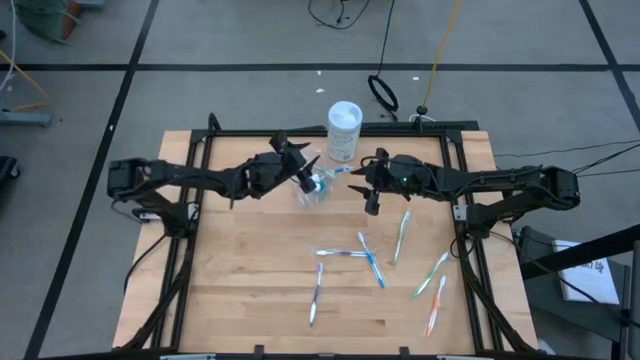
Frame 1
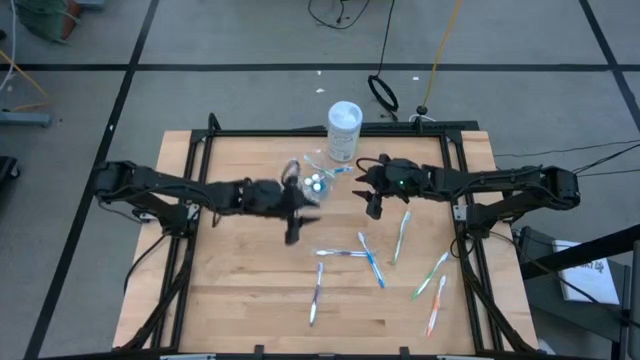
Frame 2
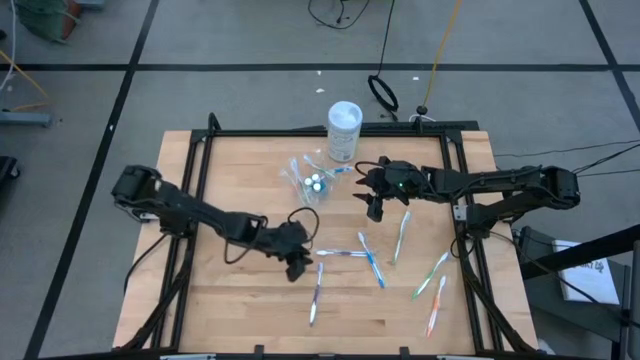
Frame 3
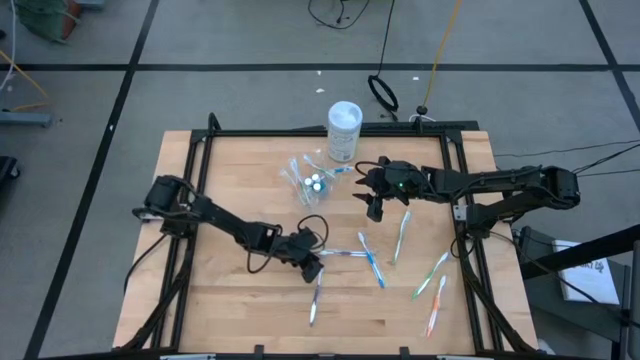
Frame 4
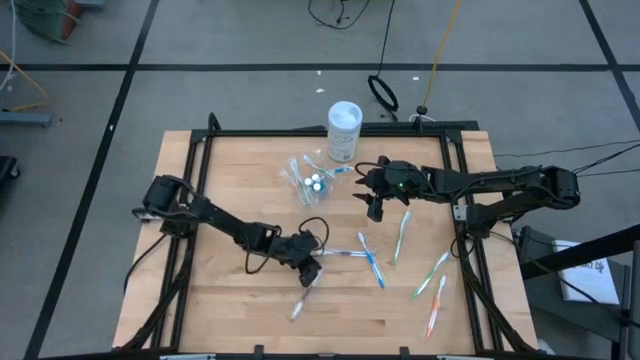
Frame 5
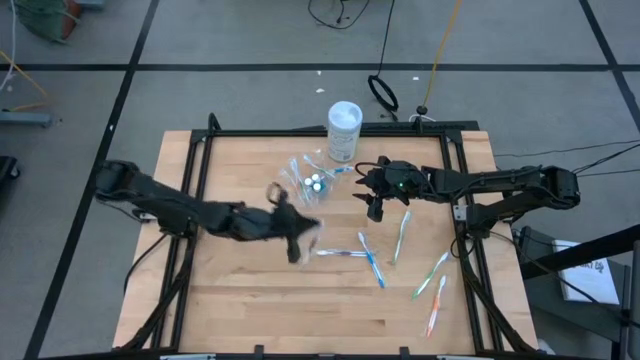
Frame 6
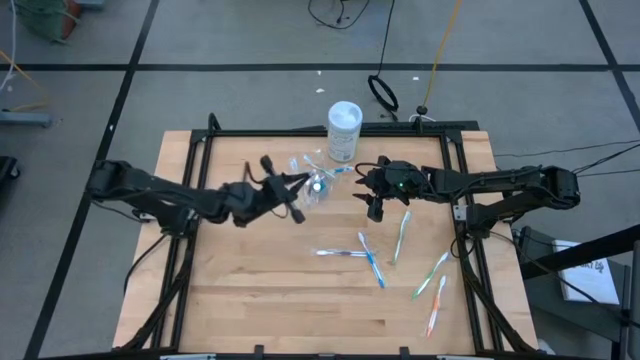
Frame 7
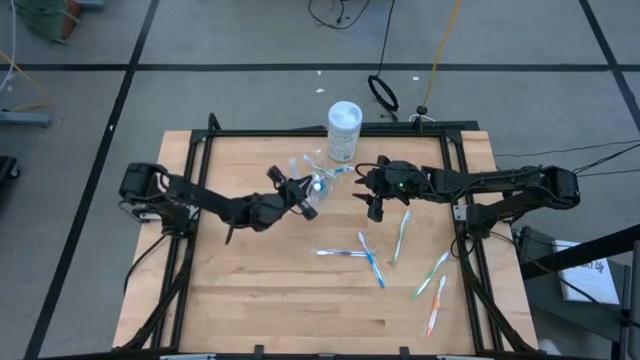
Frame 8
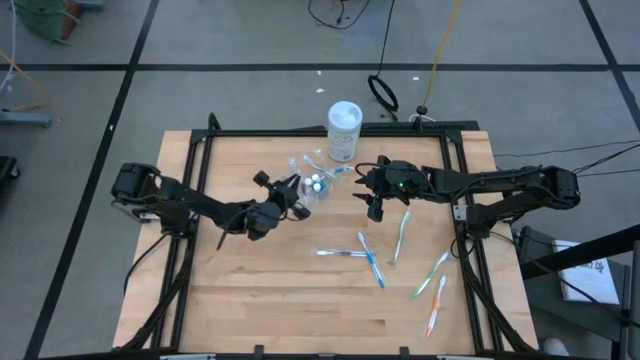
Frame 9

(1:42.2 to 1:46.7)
Task: Pick & Place toothbrushing station
Put the purple toothbrush into the transparent organizer

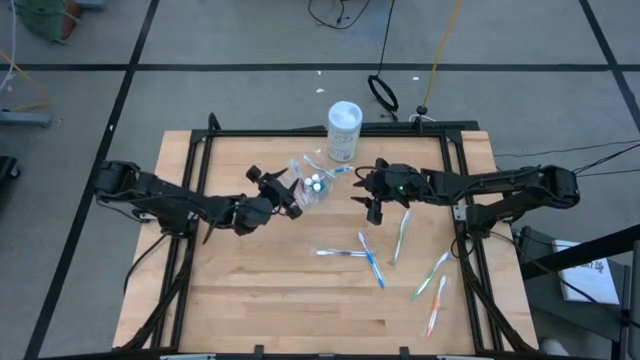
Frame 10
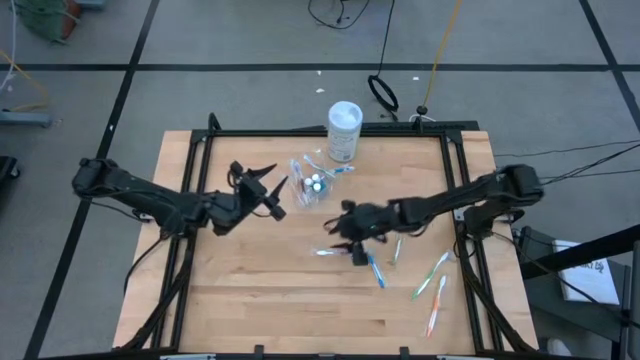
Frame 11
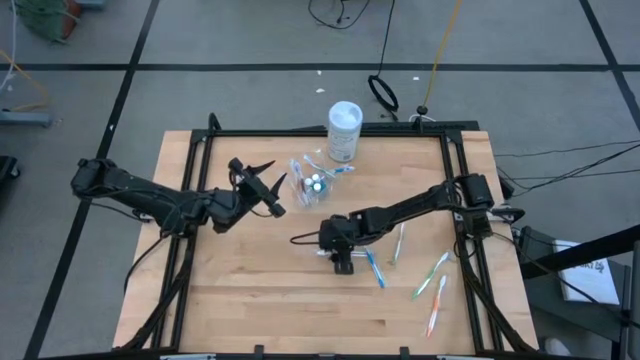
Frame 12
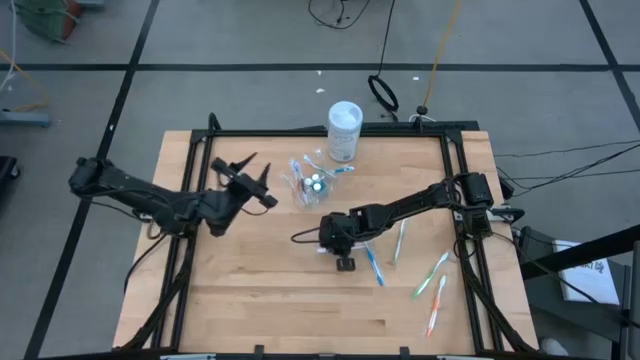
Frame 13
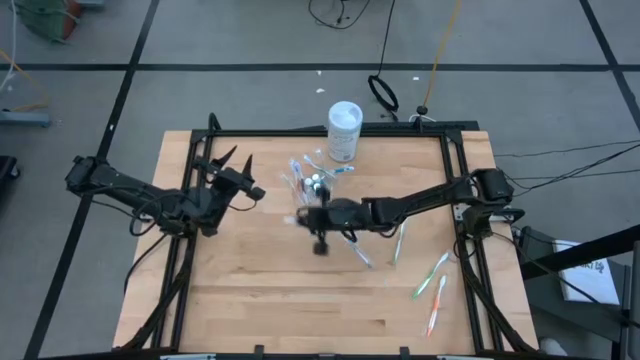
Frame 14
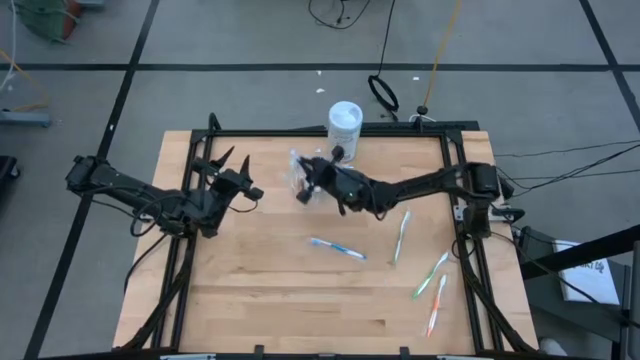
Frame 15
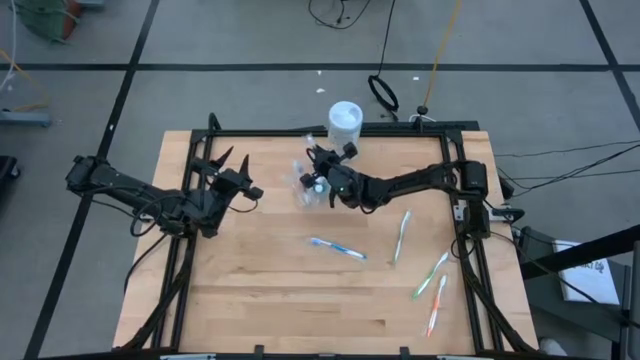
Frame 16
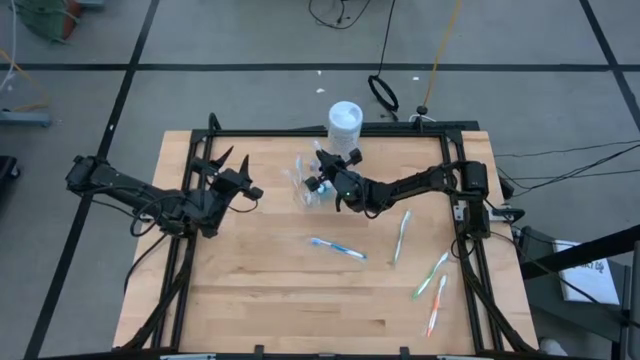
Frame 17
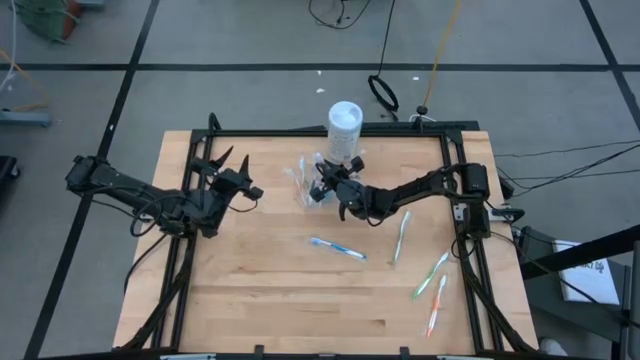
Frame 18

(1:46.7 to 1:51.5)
Put the purple toothbrush into the transparent organizer

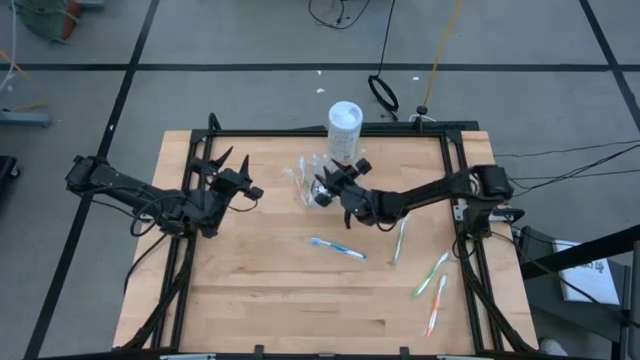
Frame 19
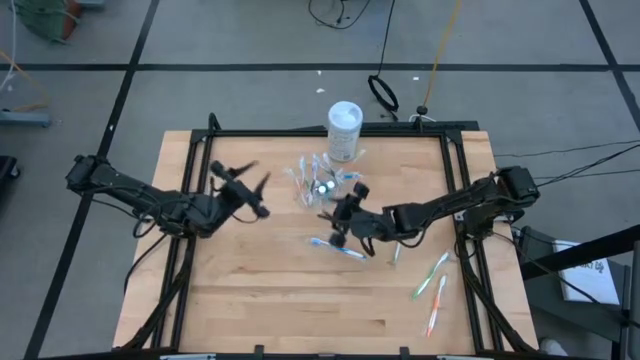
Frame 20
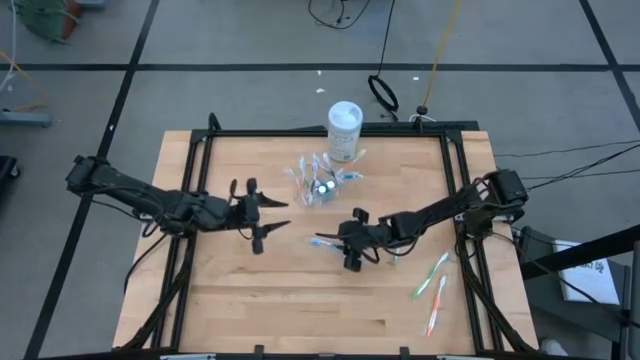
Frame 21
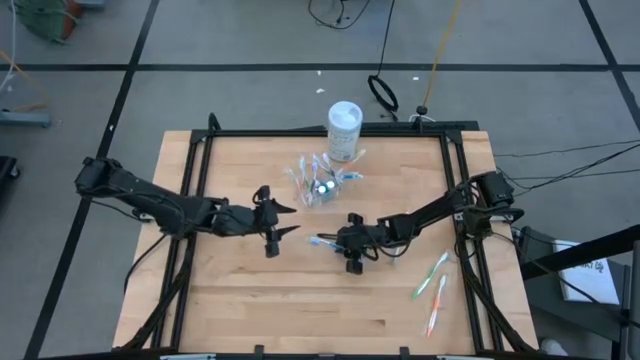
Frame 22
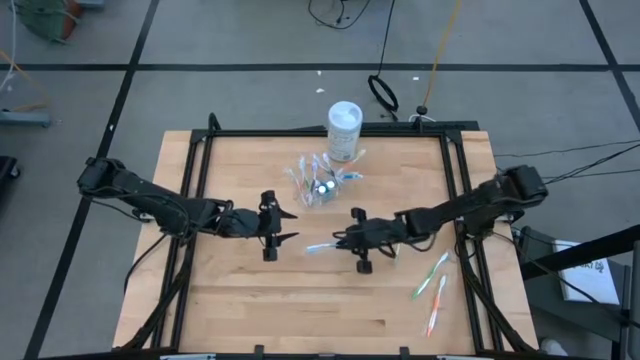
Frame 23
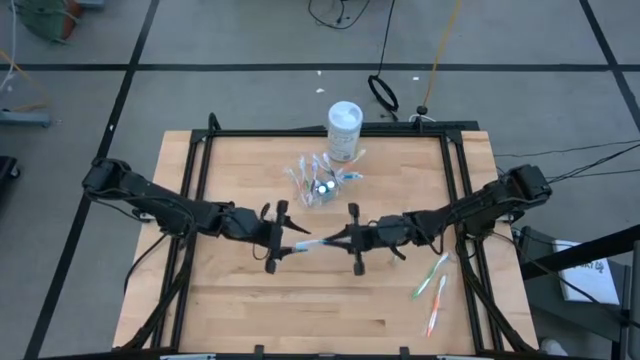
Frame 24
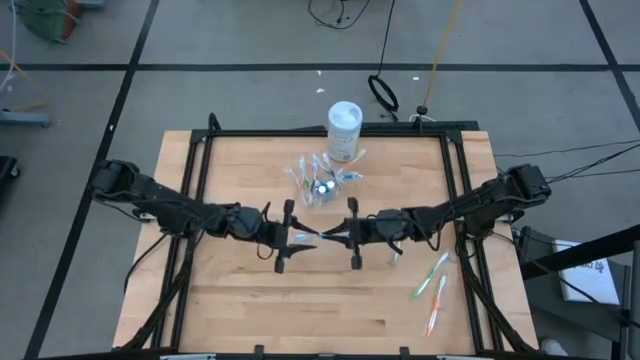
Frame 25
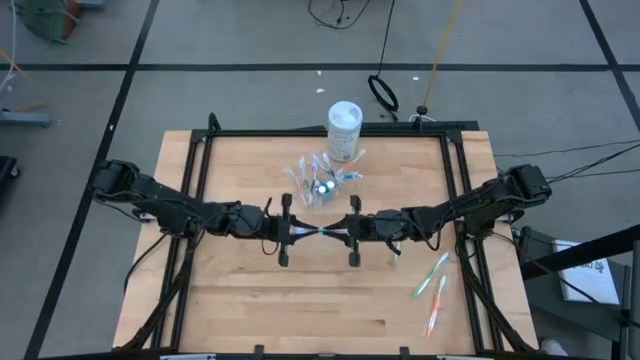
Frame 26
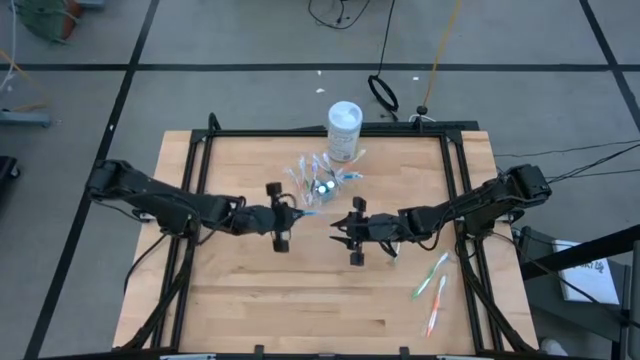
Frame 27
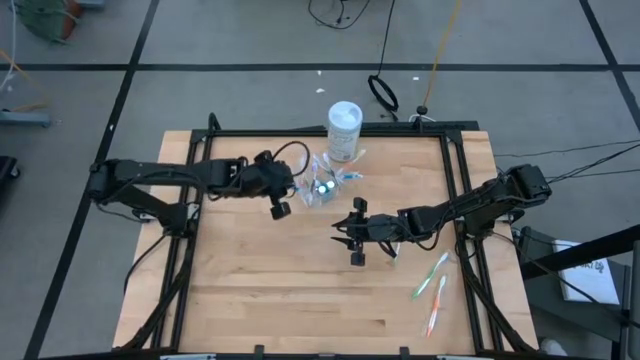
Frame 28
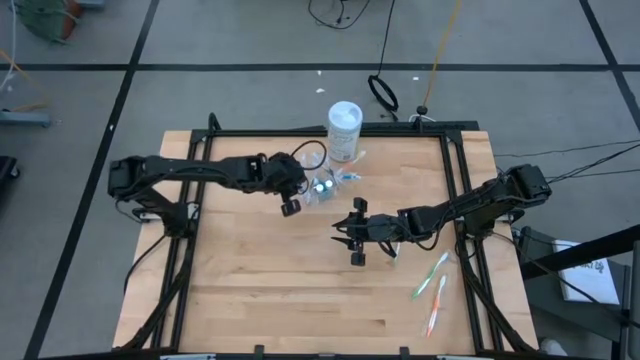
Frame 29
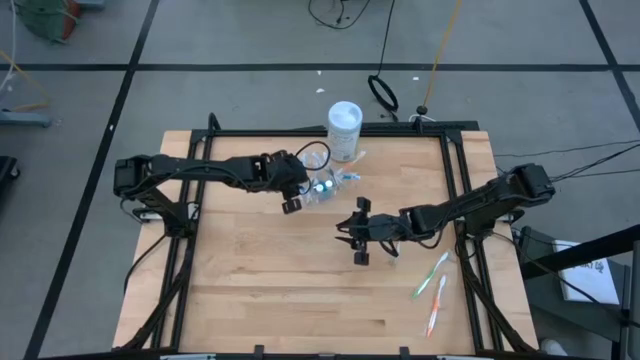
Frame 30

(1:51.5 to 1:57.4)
Put the blue toothbrush into the transparent organizer

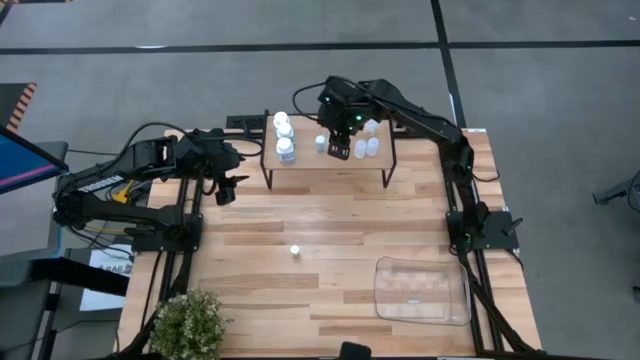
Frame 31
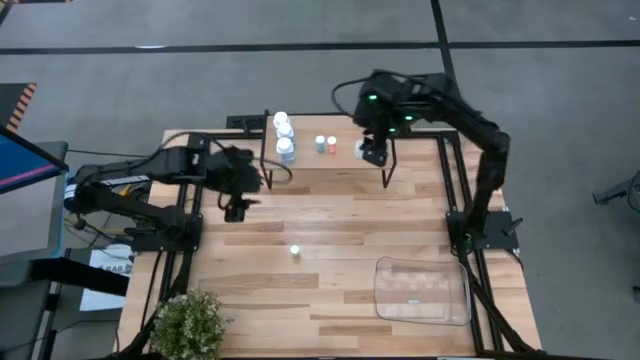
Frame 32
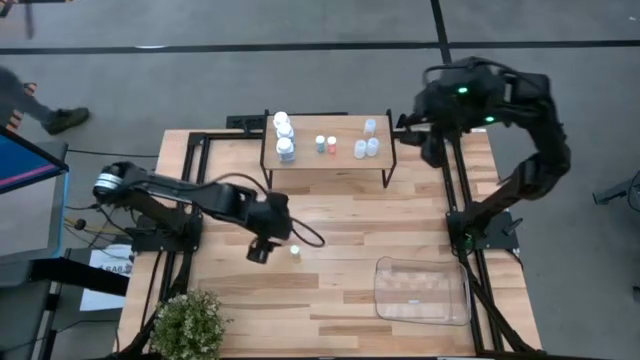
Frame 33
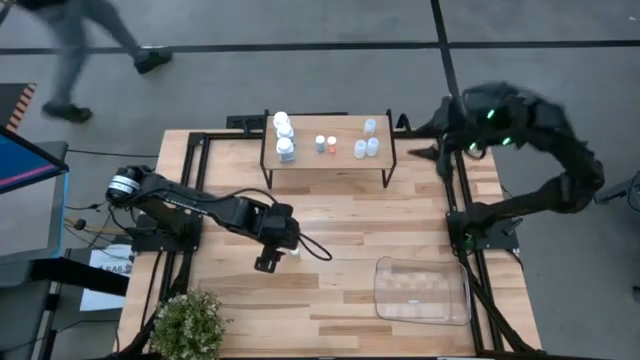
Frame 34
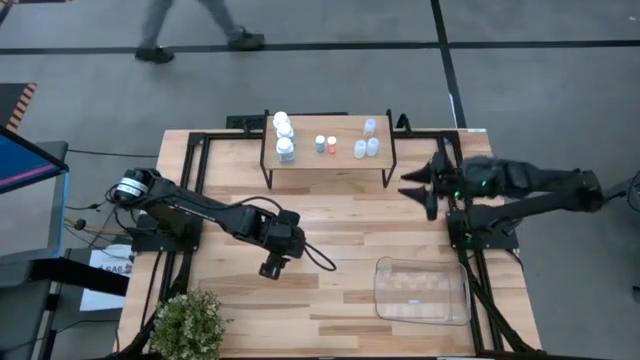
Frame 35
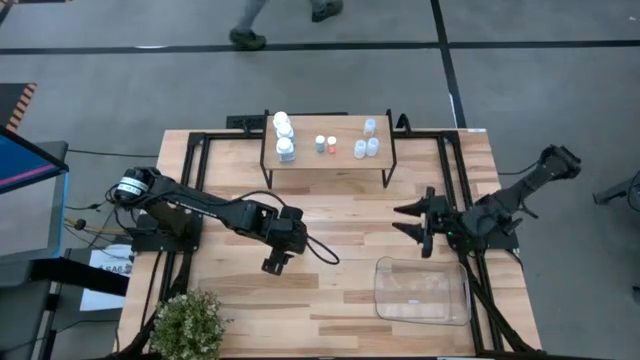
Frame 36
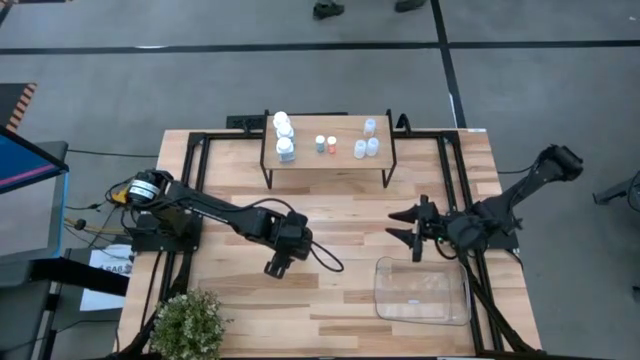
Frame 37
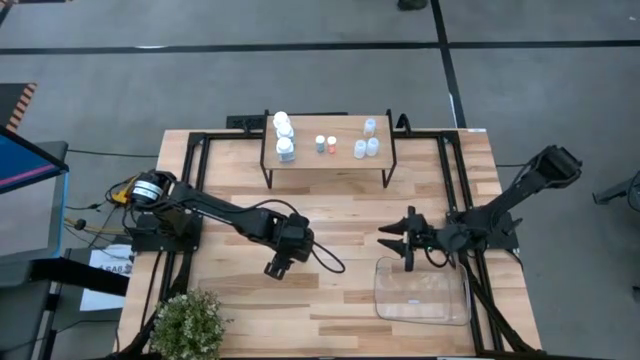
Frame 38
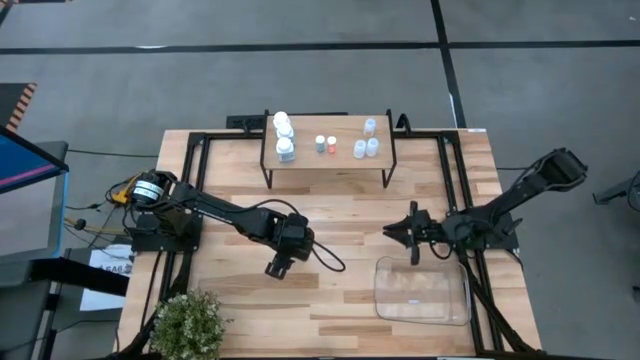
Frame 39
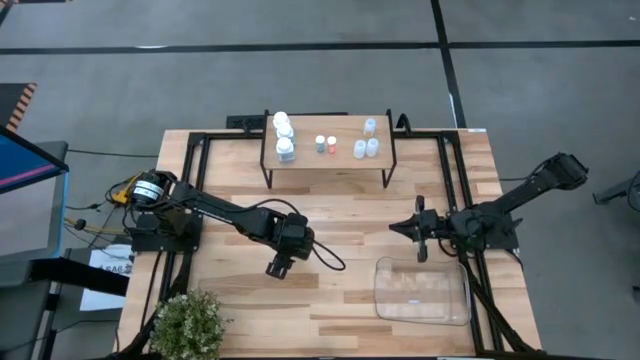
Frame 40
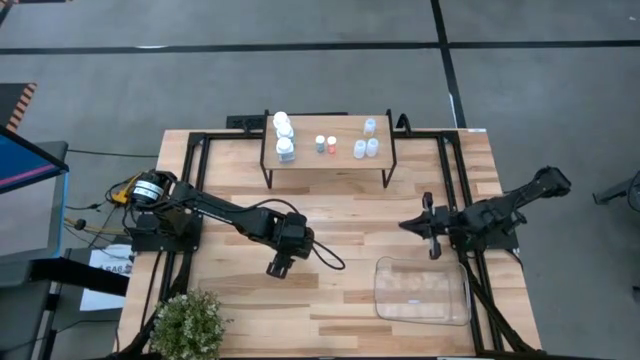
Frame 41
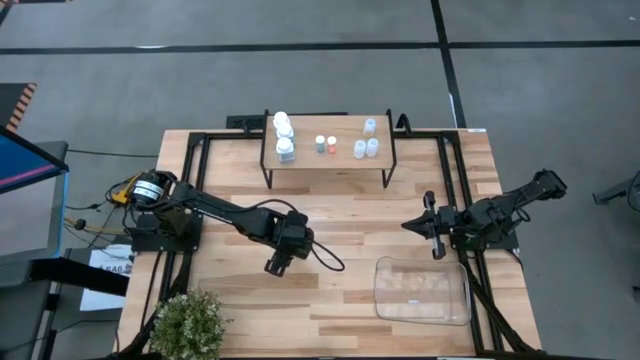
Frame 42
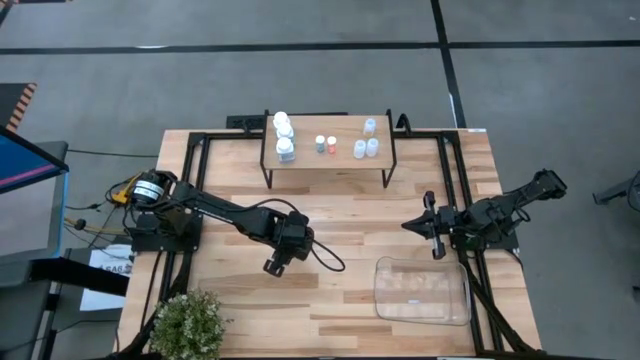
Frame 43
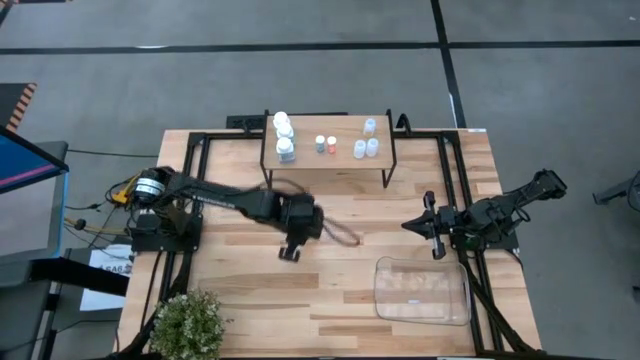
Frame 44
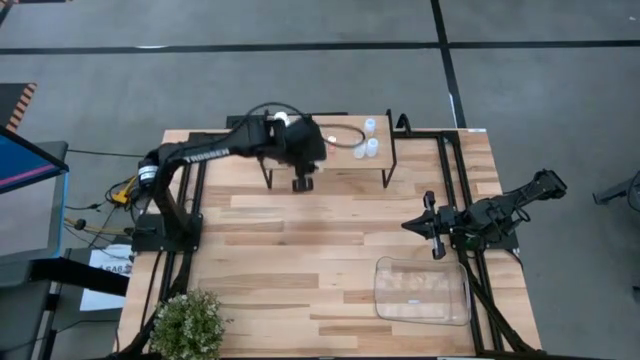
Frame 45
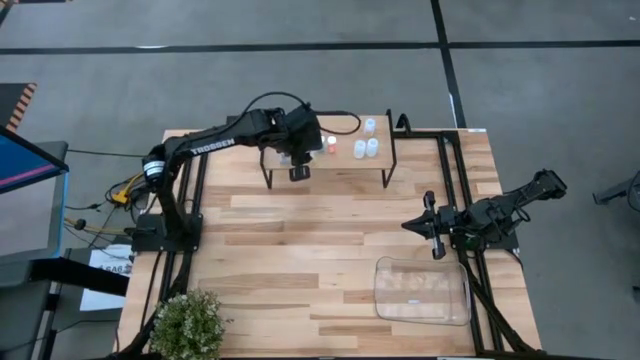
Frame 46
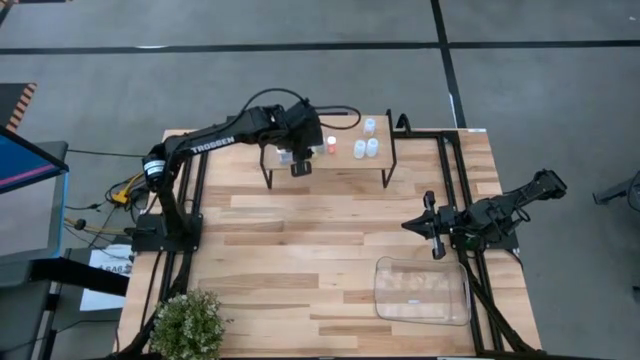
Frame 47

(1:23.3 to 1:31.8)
Task: Pick and place medicine bottles onto shelf by color
Put the yellow pill bottle on the shelf
